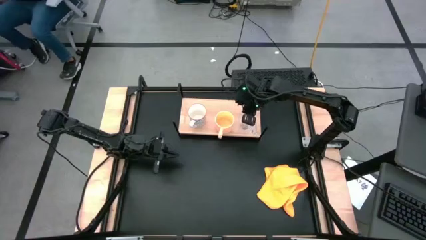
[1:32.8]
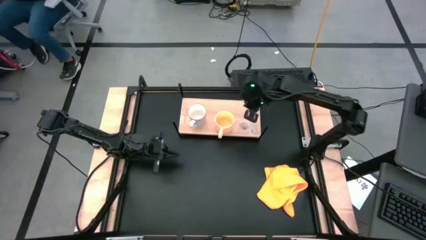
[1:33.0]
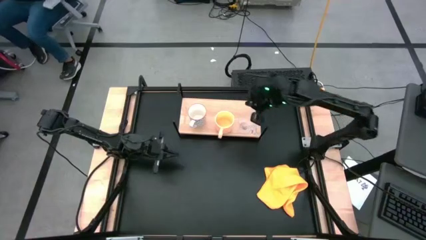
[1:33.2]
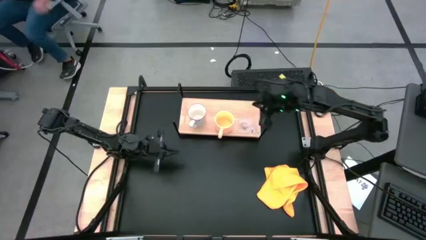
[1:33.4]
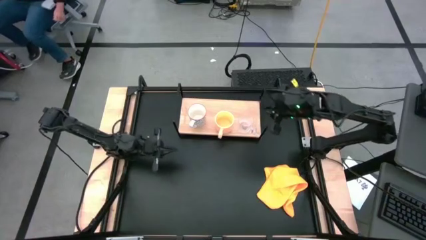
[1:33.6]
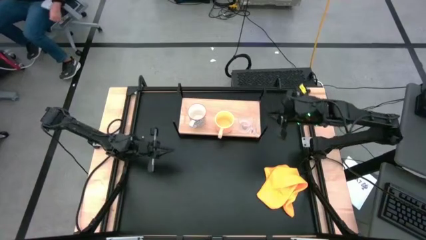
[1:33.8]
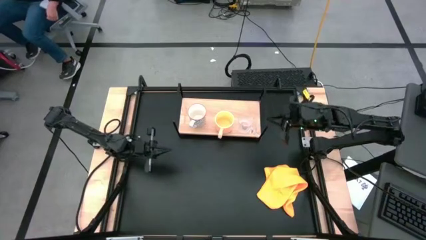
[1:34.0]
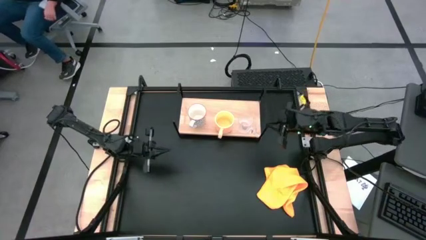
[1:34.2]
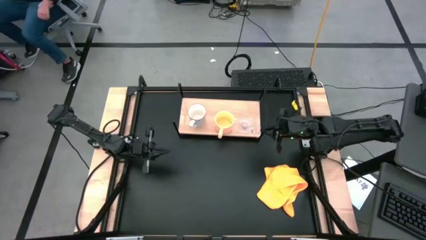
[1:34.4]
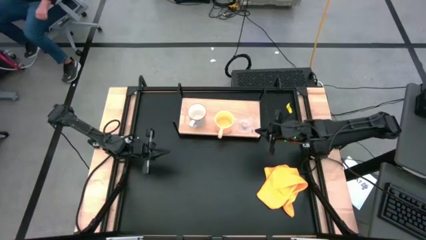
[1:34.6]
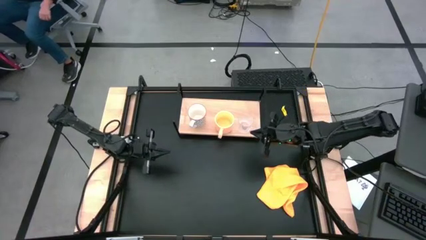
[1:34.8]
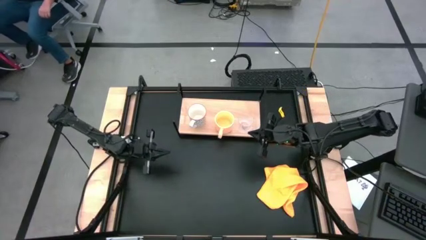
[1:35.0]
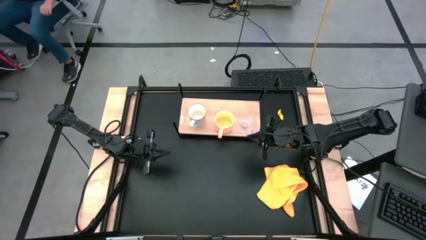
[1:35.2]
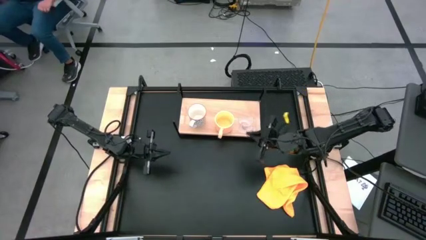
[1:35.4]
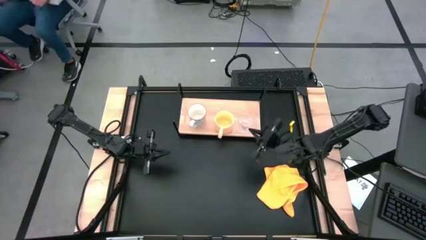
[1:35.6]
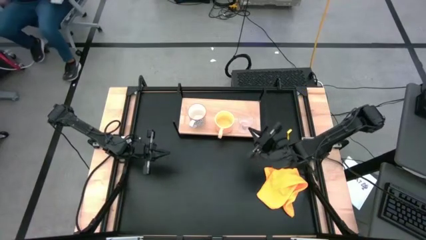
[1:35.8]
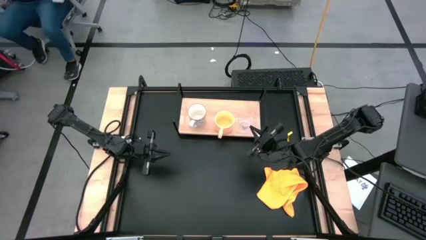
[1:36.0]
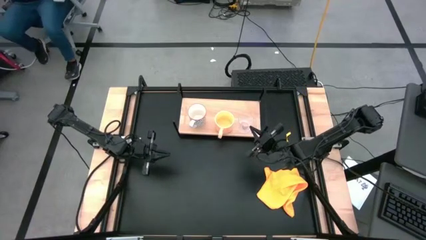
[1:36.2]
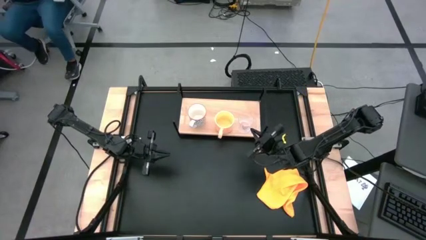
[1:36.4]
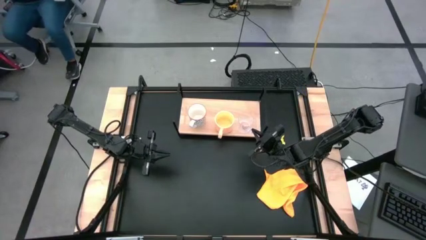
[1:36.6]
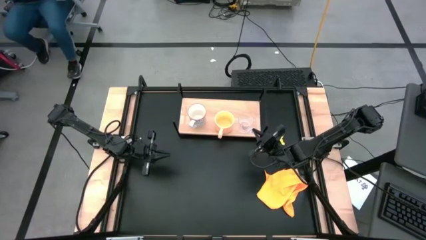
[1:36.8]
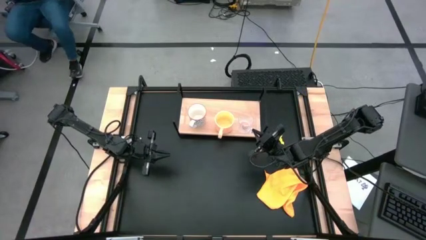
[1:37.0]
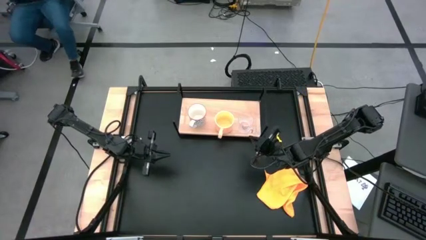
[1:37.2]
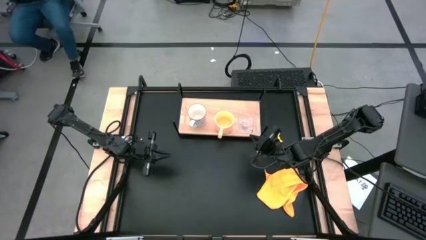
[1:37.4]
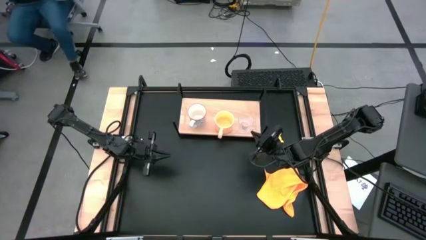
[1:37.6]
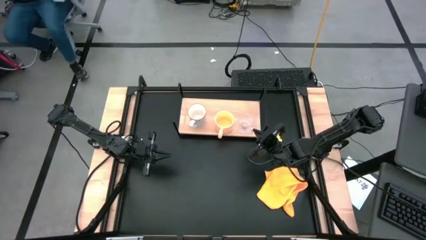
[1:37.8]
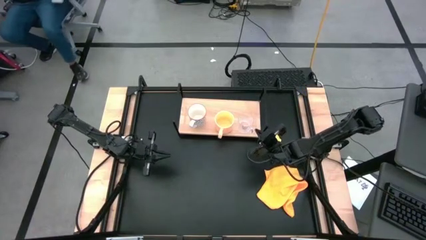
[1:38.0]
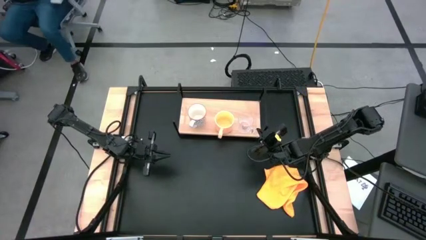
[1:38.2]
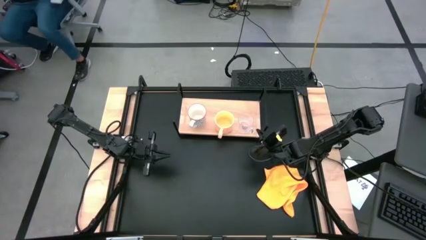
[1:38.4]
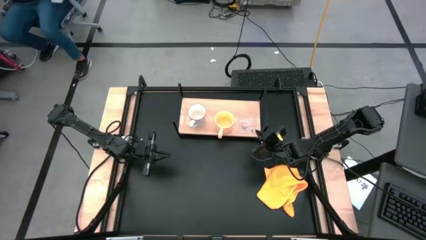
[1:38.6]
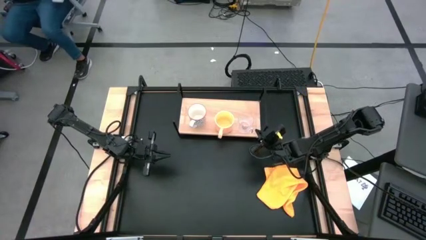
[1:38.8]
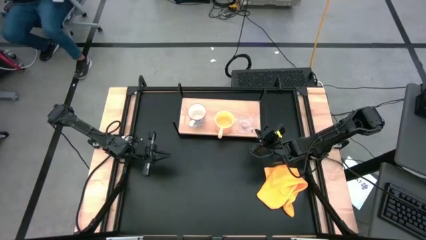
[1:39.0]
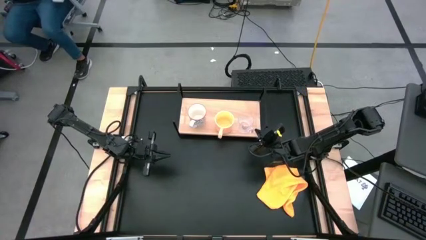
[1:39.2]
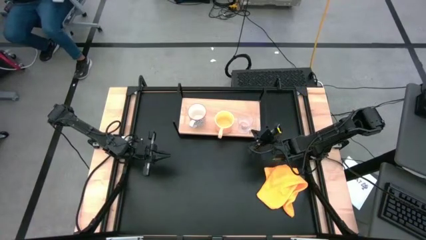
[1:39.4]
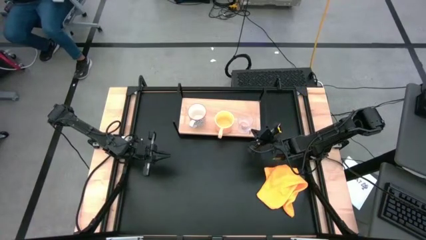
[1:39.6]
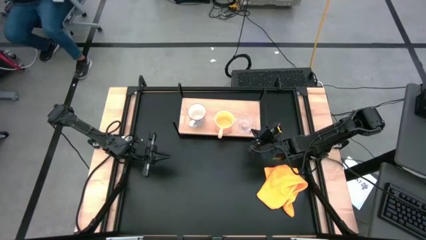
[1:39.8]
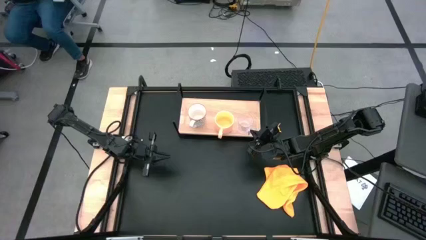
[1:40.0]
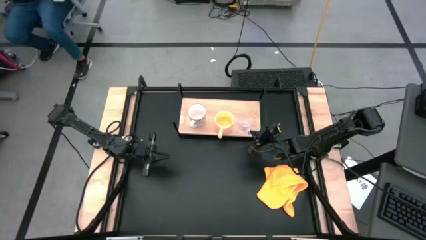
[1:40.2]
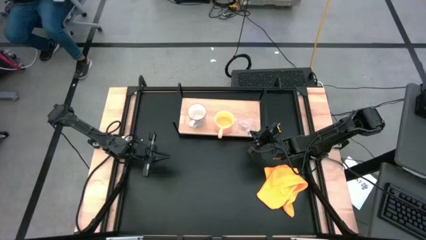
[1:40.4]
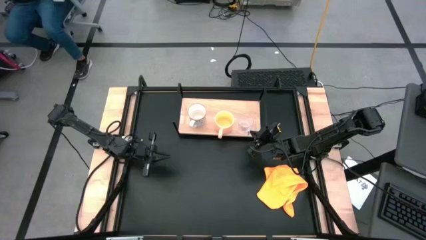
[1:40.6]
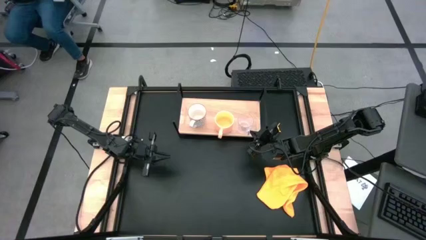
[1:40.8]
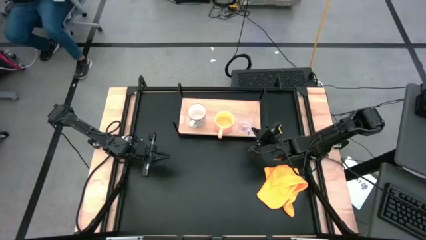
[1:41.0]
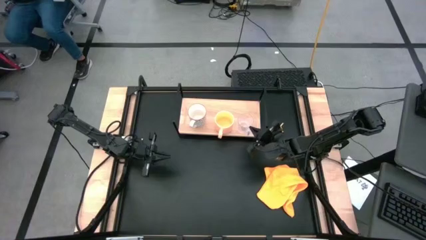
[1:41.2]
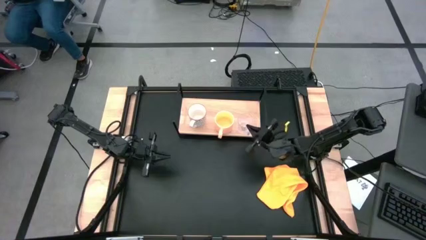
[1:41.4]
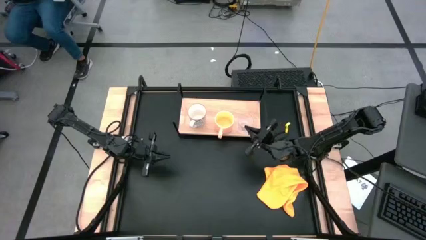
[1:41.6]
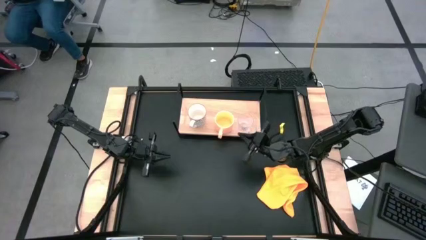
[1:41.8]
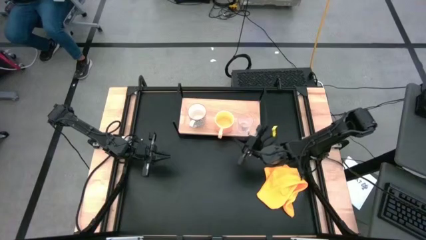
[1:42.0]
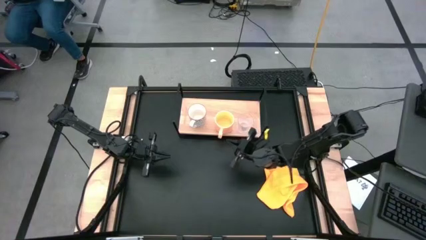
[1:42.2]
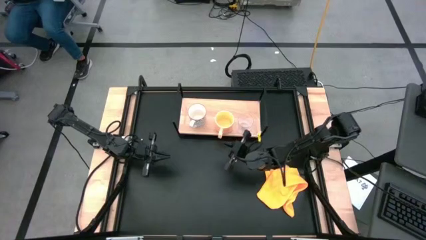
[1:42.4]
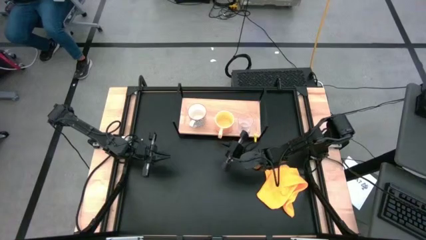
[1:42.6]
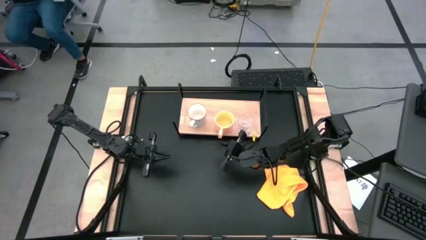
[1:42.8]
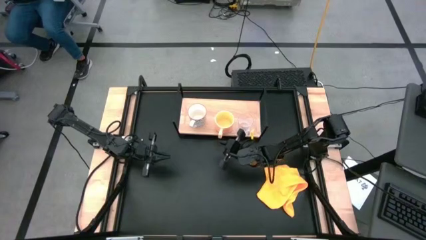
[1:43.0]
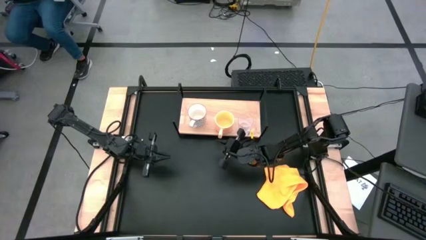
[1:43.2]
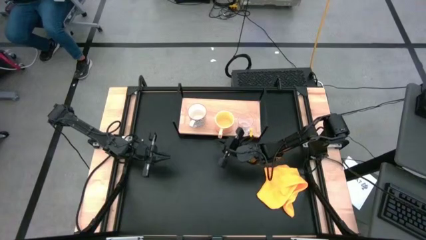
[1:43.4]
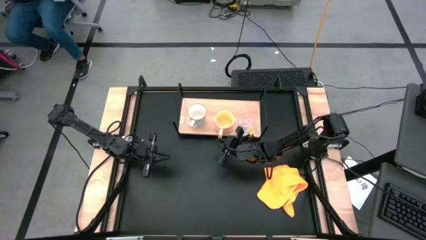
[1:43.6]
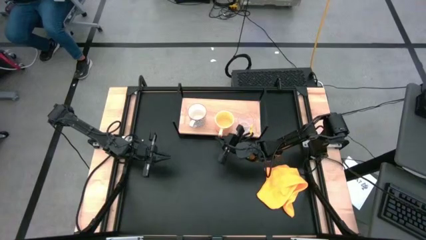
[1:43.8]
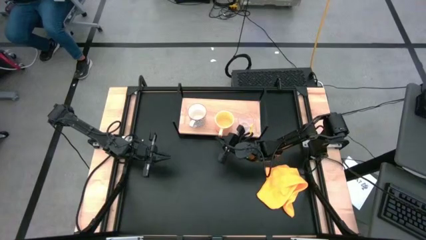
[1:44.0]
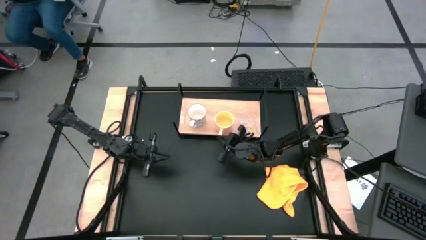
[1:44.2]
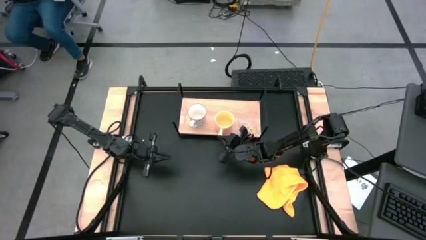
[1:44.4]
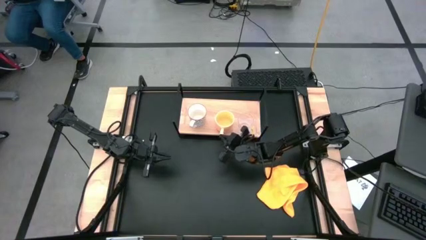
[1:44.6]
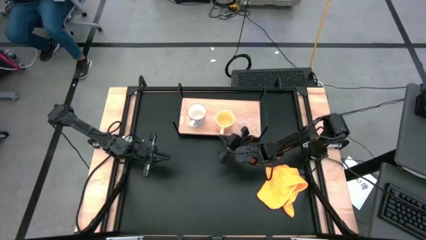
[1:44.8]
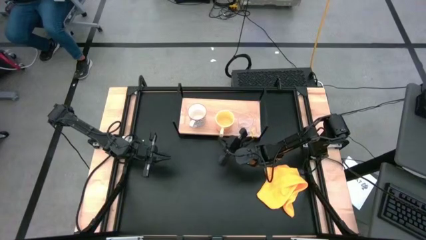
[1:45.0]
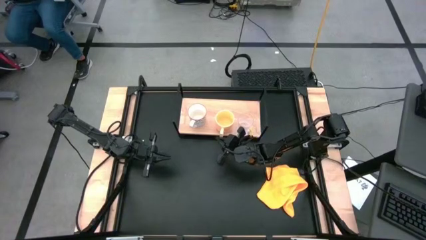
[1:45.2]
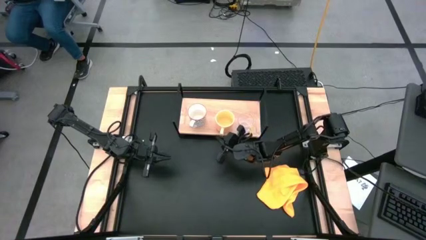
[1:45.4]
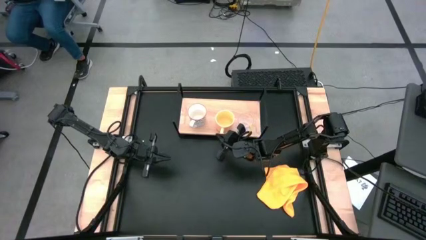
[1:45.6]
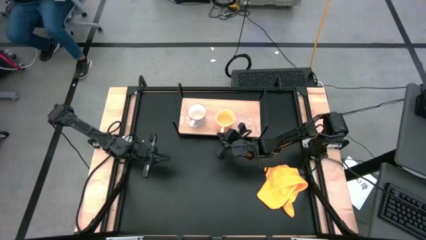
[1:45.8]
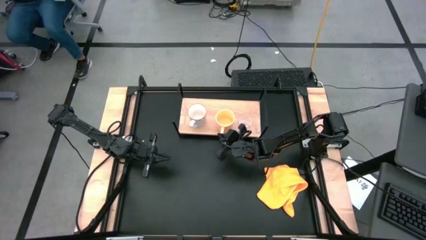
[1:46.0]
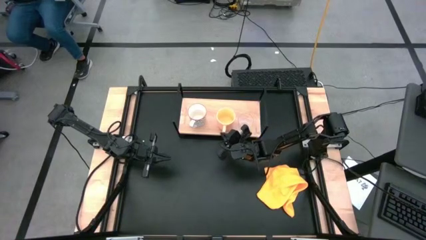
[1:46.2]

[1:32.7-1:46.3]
Task: Stack small to large cups/mugs on shelf
Adjust the mugs on the shelf

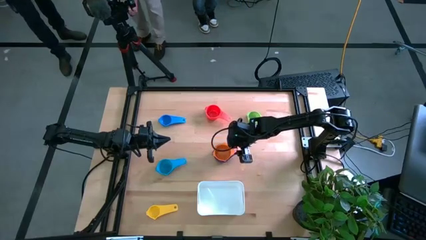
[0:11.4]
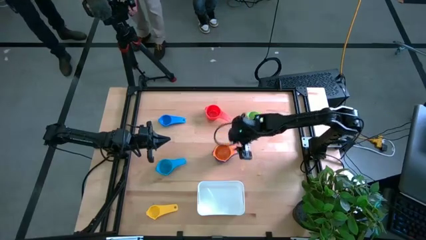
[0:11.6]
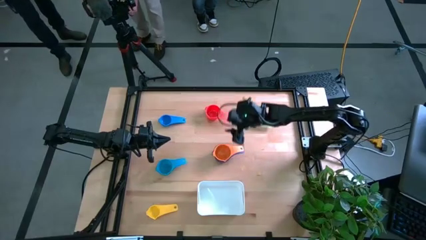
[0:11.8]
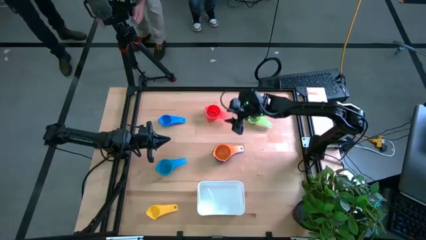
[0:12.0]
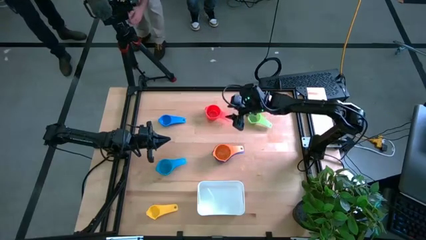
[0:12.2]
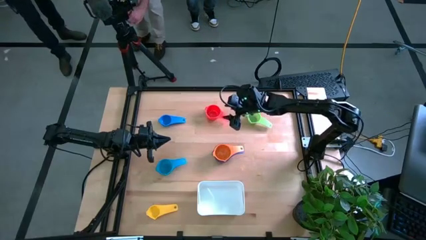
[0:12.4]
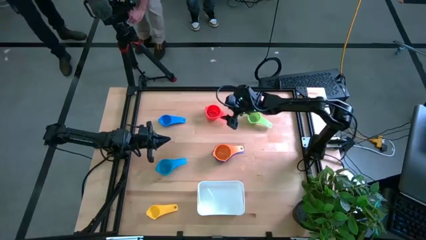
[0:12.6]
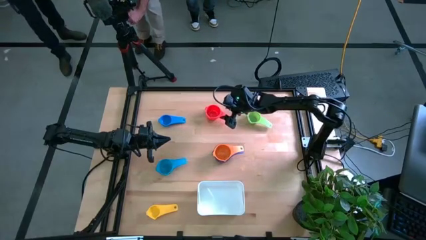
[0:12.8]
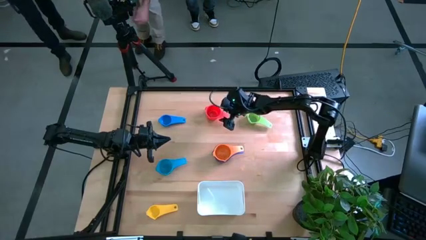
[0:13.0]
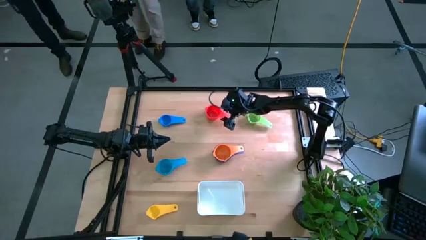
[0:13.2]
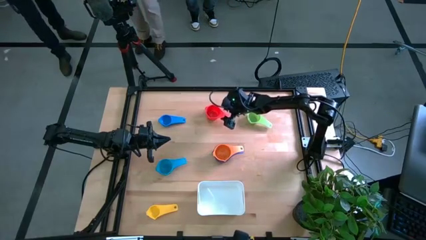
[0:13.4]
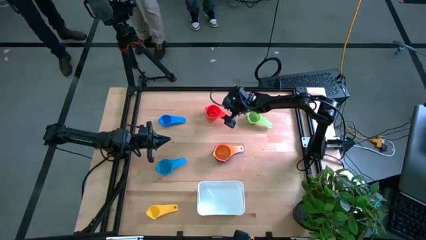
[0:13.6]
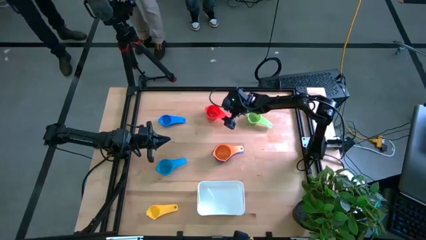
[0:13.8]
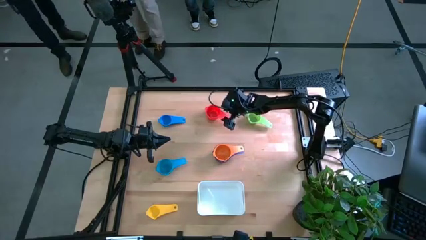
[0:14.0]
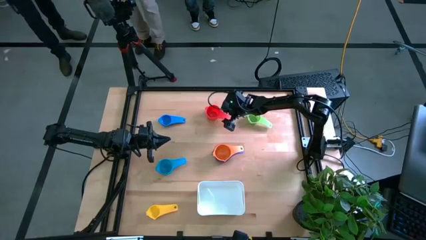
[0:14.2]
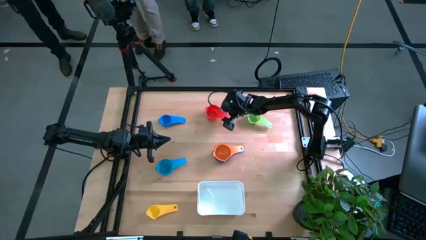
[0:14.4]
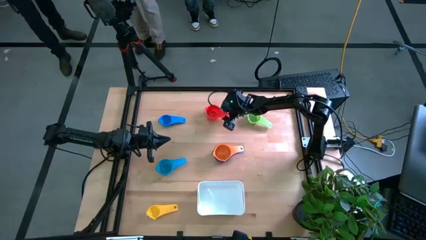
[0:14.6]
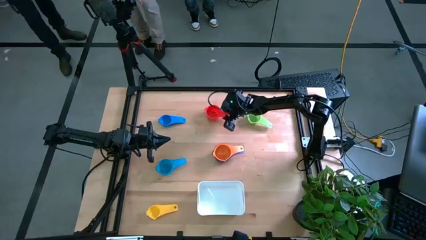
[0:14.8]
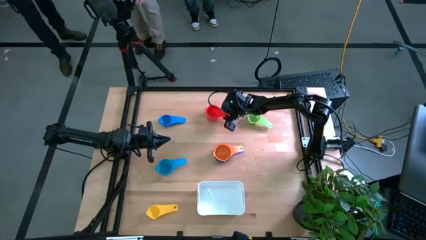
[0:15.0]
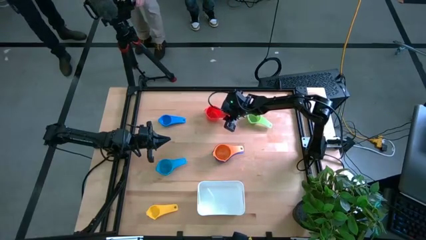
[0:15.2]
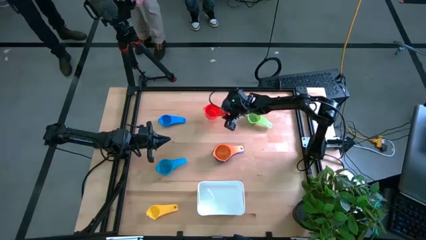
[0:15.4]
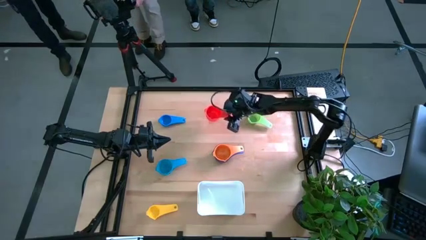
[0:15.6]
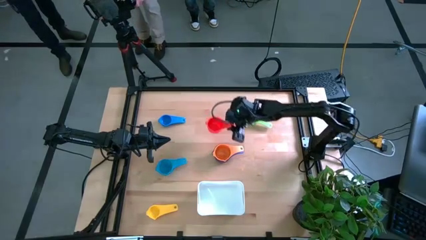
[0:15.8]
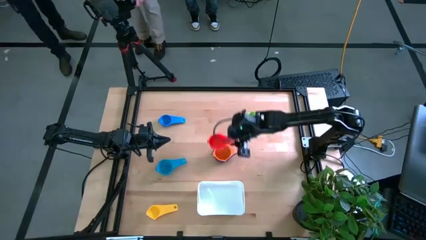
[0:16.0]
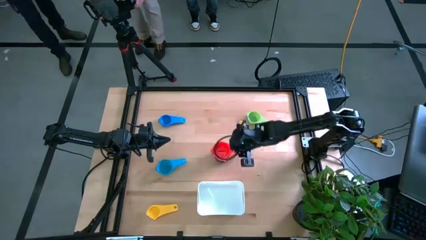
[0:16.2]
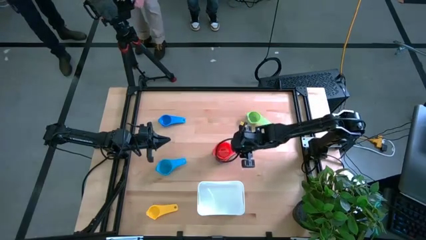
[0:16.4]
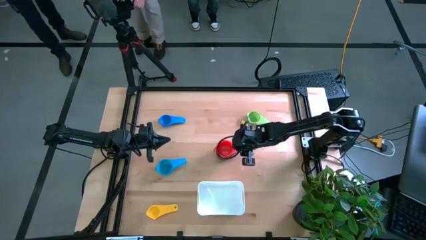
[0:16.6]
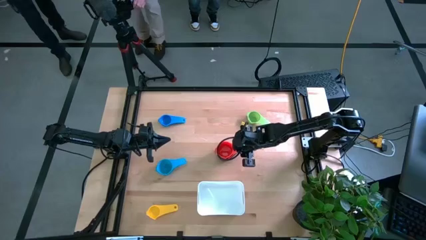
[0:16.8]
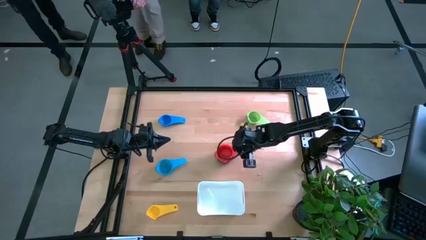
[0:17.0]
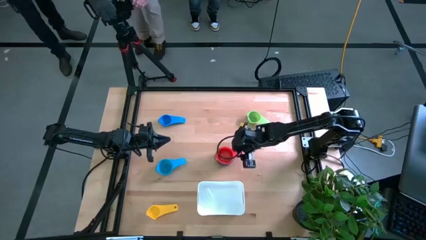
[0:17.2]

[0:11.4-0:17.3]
Task: Nest measuring cups in basket
Stack the red measuring cup on the orange measuring cup
